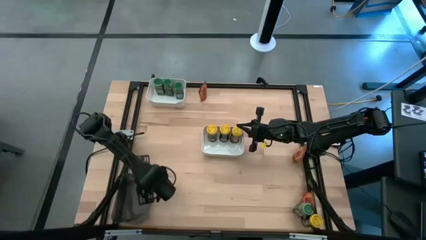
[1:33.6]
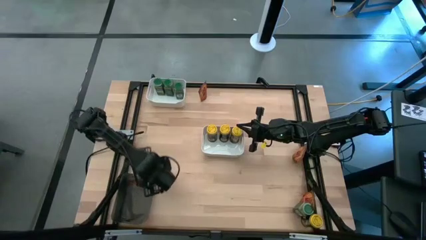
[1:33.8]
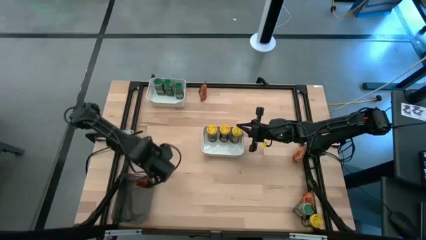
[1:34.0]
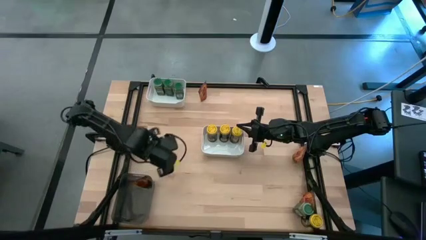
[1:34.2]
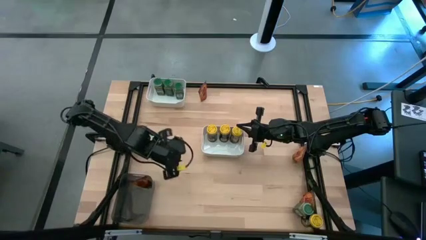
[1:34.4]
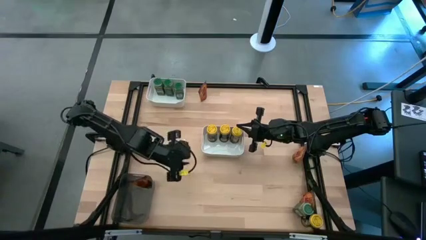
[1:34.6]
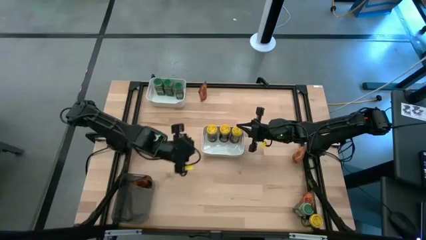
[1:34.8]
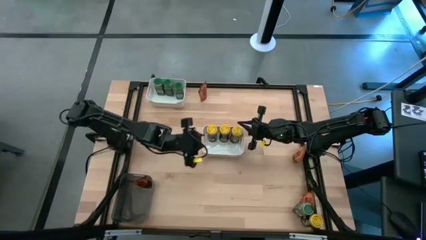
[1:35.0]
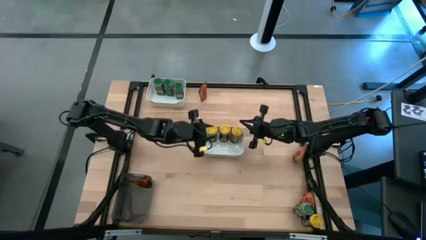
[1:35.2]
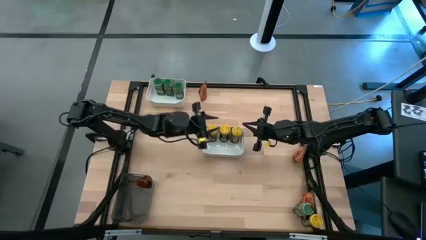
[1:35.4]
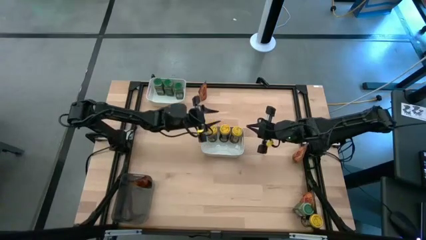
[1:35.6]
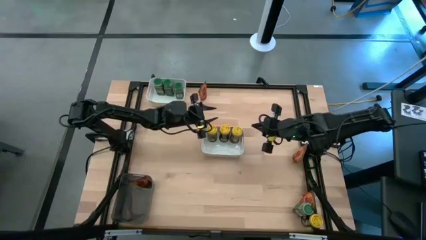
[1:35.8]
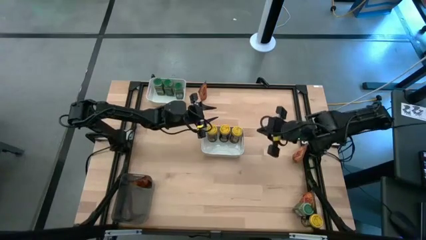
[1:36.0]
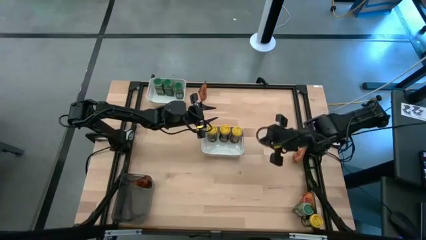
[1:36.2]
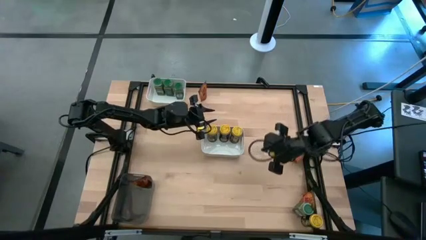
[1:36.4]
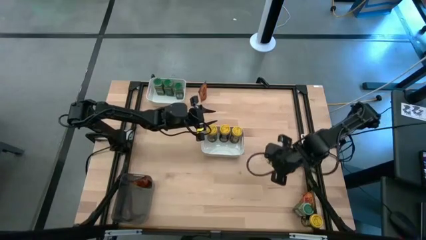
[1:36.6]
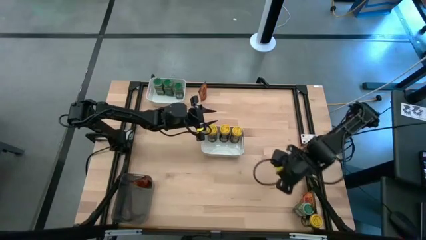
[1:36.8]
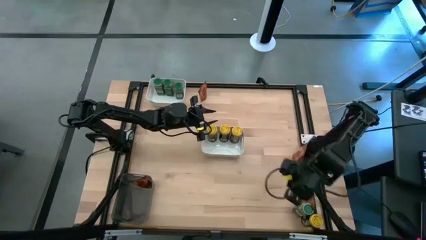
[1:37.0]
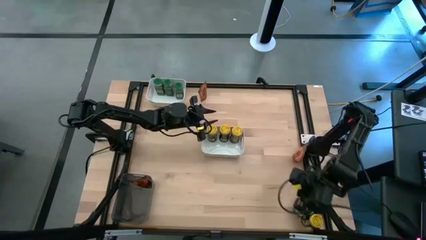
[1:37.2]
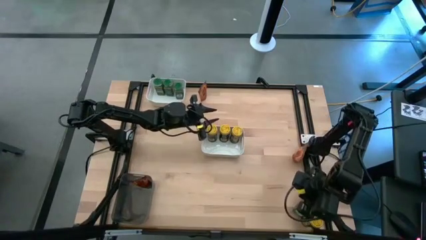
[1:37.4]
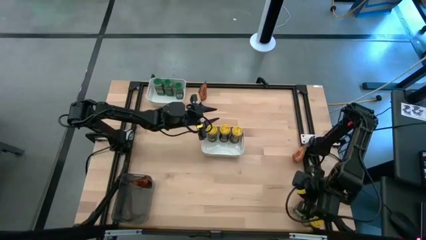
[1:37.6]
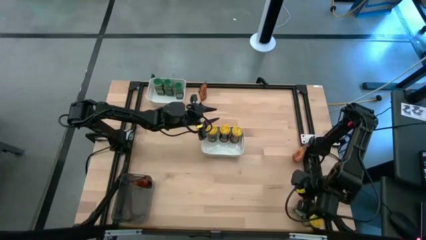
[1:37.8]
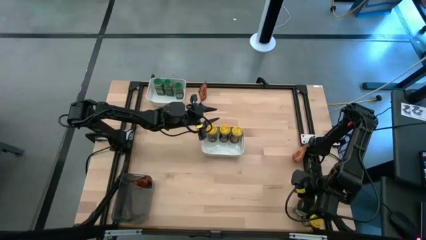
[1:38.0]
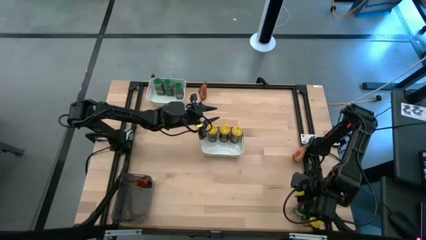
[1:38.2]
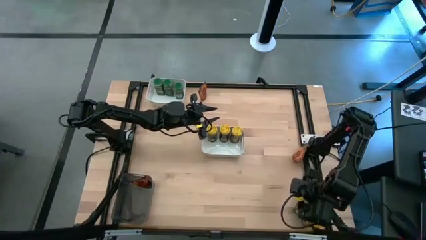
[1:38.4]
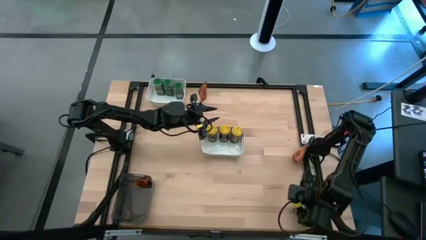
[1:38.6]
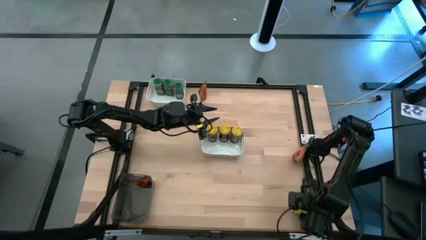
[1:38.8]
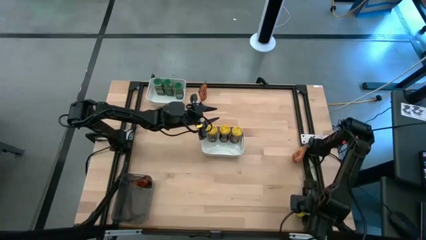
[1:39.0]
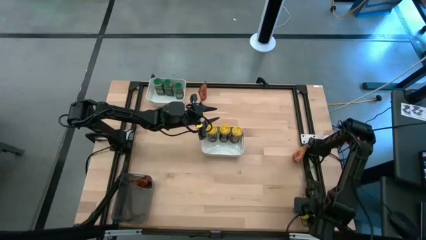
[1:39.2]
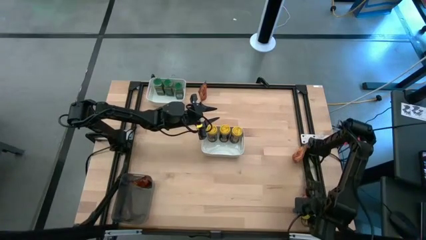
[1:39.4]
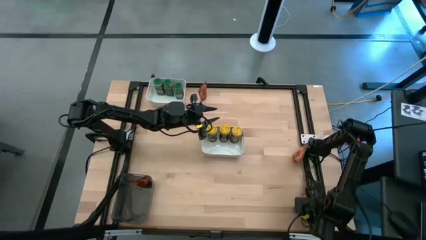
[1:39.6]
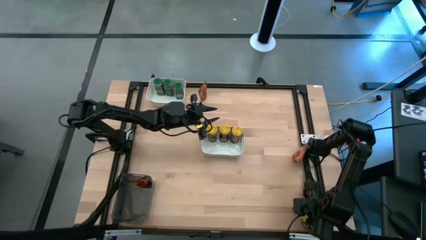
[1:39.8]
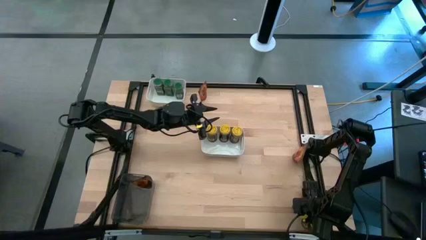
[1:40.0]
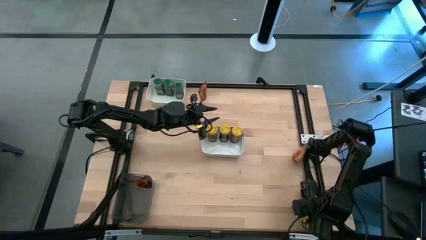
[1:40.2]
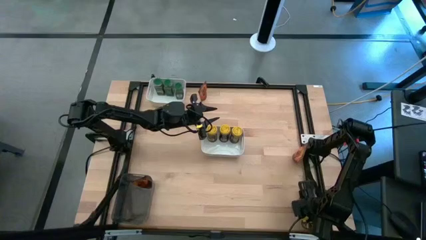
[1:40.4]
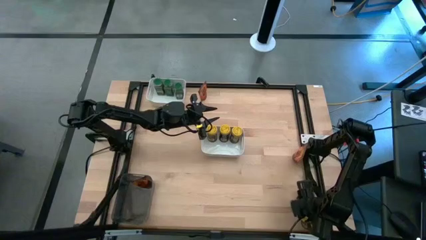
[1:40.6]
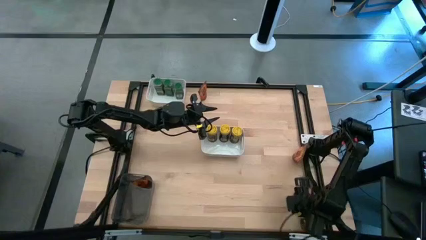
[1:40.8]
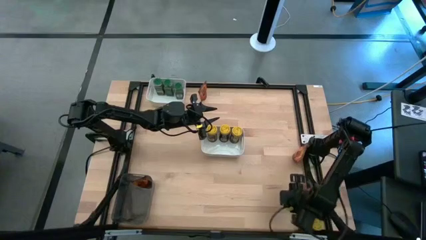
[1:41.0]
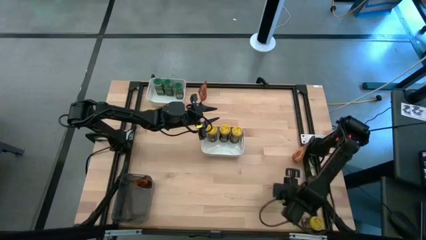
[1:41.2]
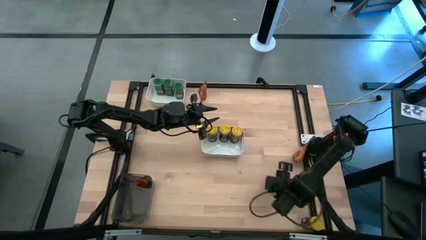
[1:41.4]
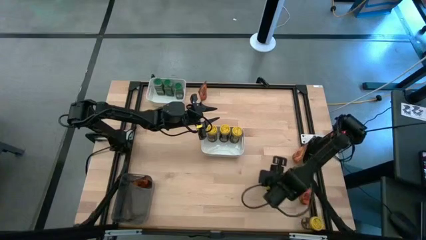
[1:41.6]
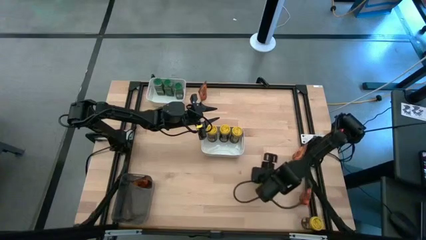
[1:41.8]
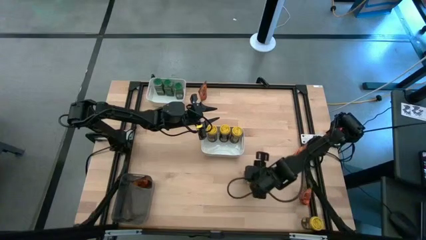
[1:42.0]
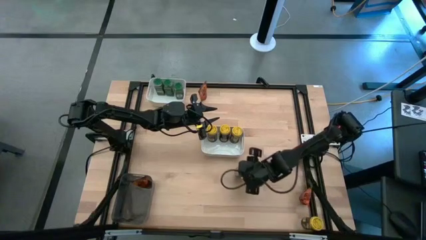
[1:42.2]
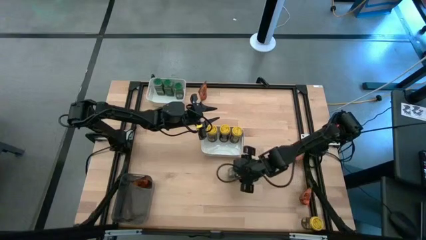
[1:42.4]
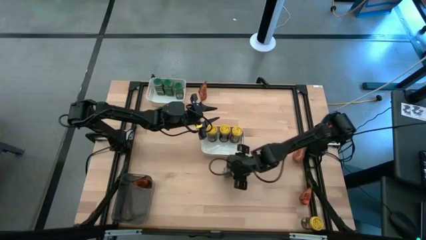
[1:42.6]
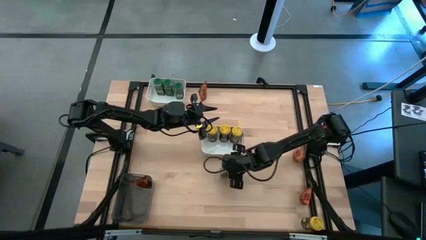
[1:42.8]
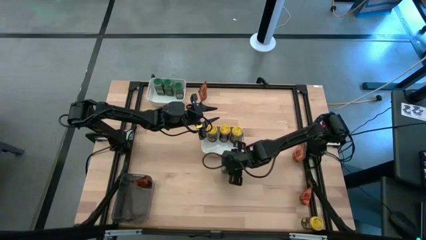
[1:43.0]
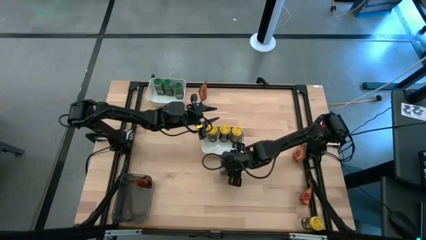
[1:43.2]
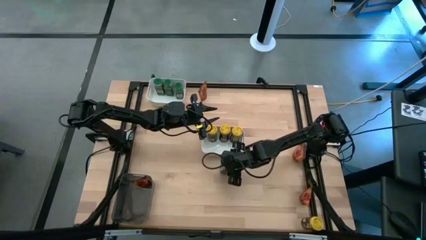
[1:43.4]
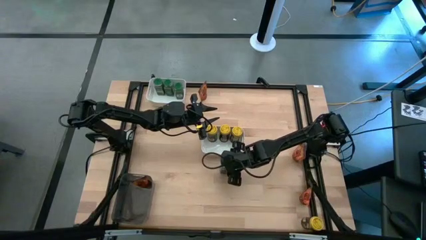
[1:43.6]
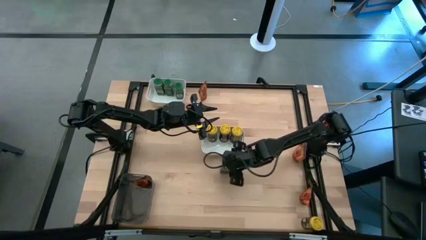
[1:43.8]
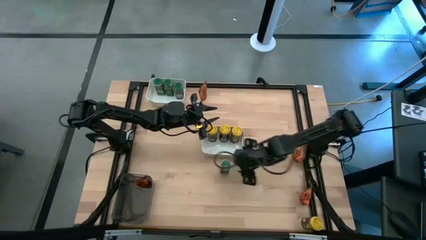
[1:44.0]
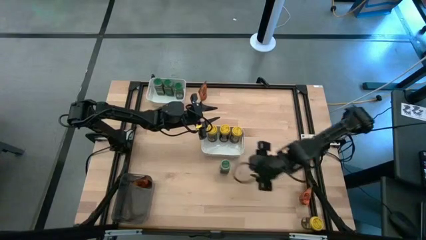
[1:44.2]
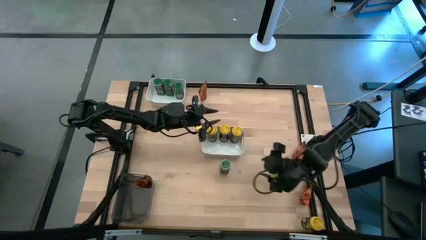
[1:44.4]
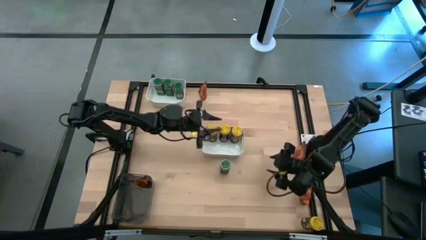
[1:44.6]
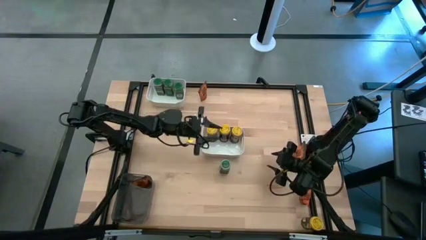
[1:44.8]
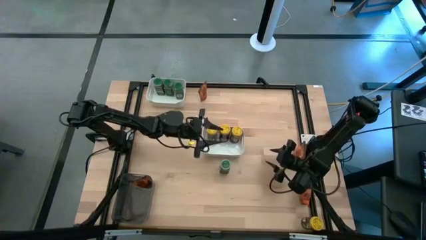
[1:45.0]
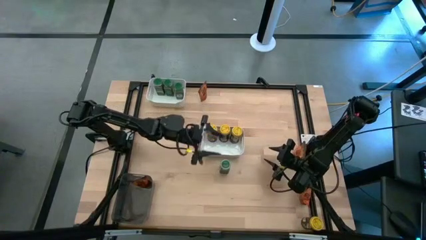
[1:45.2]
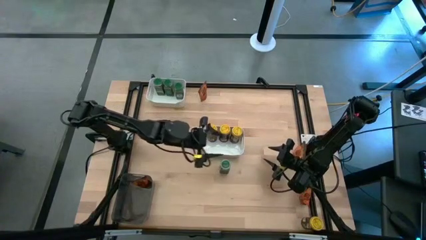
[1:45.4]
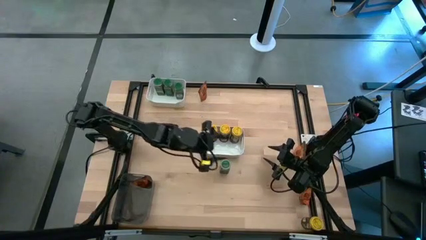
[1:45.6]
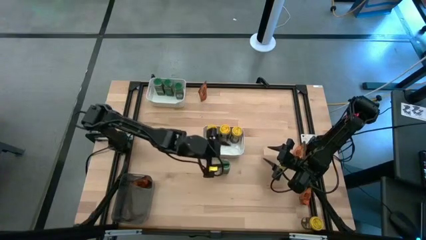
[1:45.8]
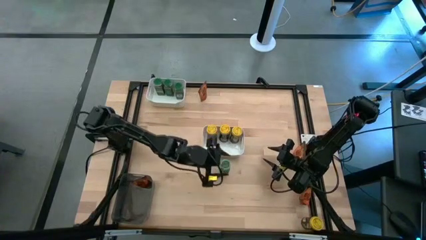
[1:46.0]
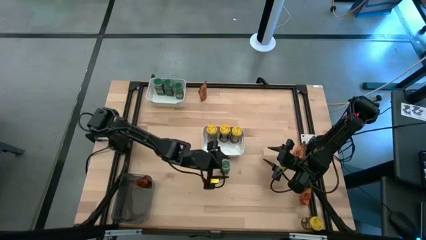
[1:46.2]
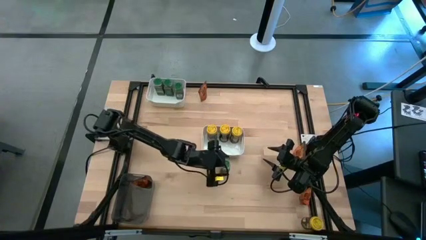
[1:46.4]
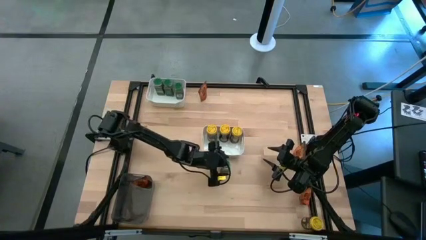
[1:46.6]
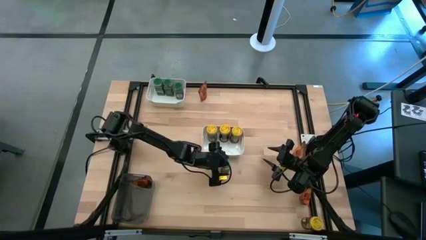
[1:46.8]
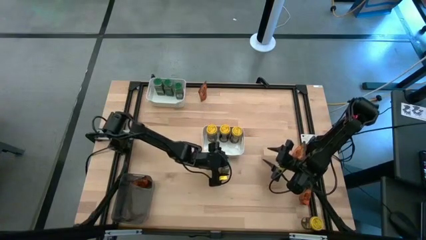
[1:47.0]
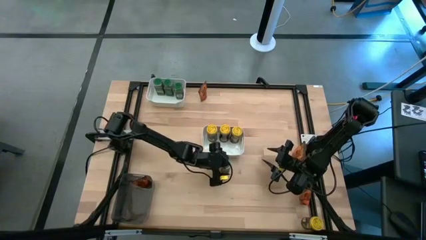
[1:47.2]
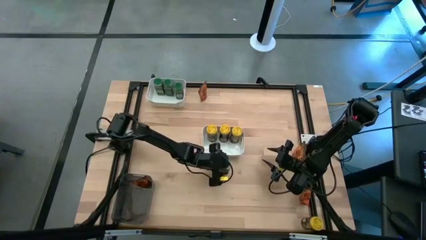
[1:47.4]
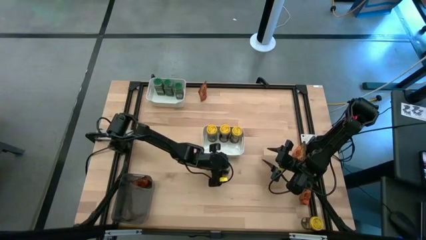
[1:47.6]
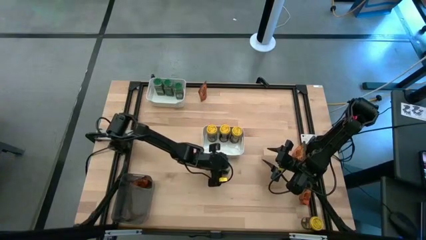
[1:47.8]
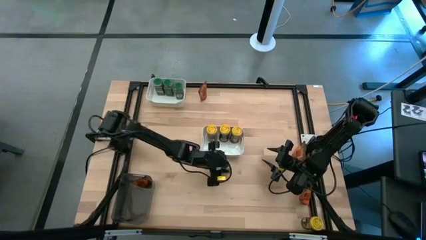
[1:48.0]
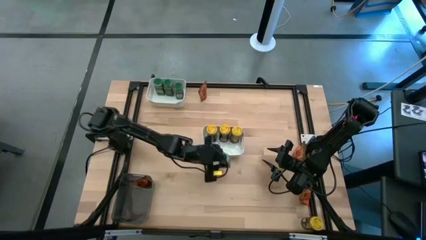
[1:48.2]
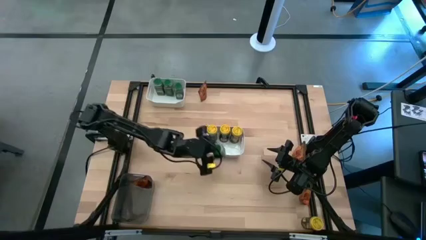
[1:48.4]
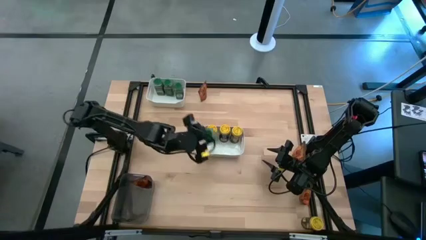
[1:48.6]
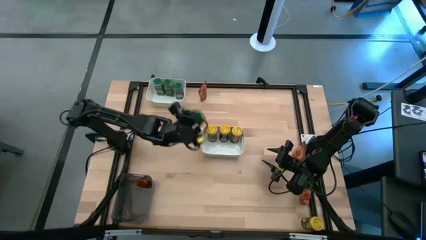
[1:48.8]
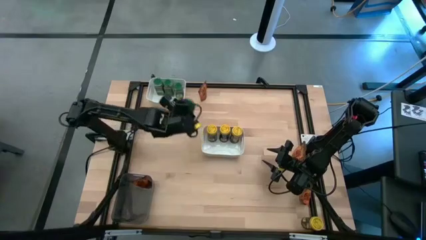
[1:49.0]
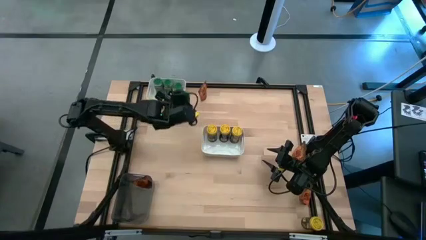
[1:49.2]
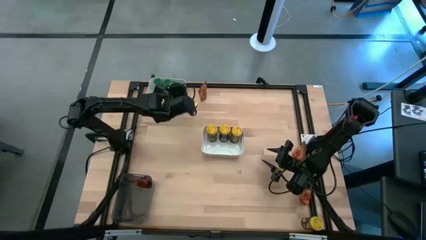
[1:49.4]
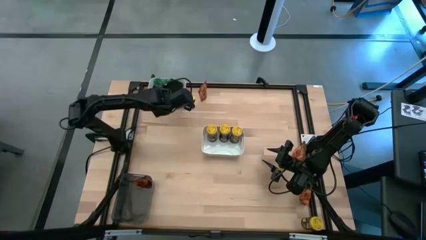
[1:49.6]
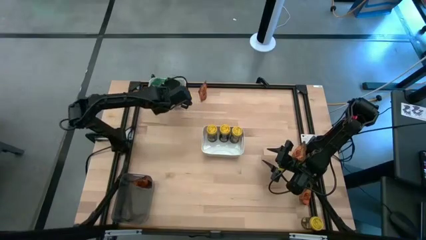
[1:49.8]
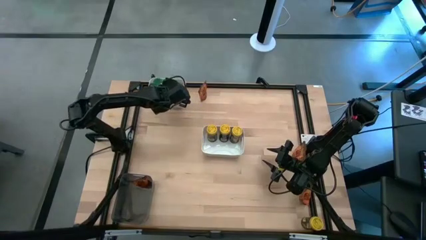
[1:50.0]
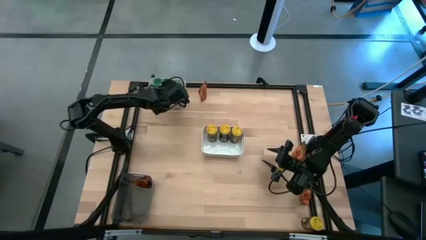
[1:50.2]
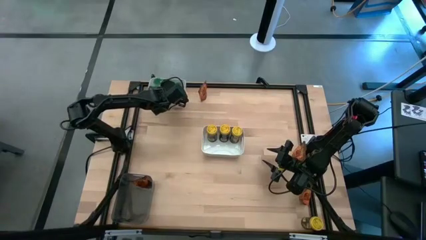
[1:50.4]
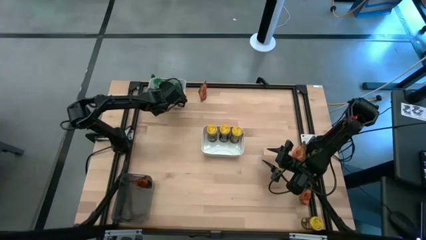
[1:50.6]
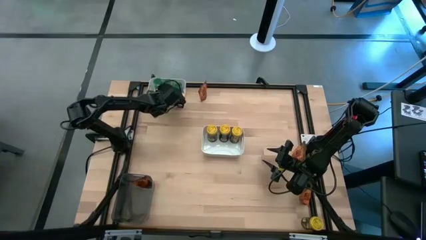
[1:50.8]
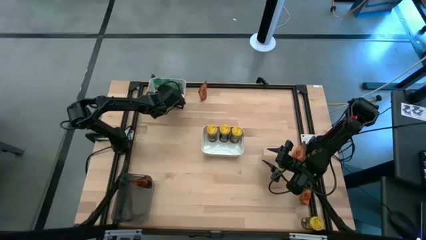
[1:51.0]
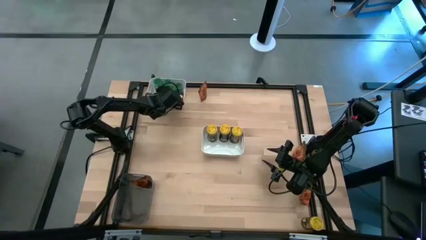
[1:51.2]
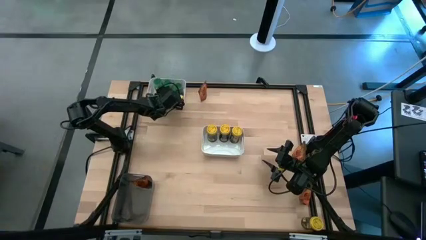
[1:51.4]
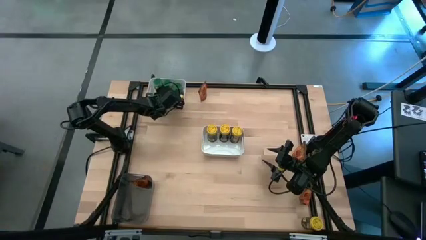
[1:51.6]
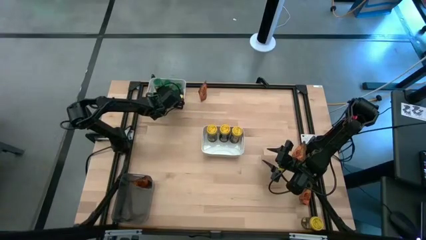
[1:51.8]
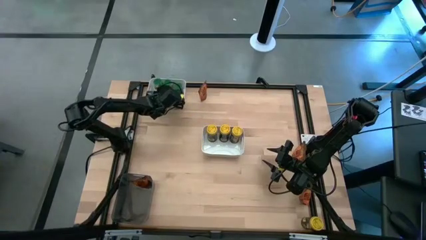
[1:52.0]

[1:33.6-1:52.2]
Task: Sort spices by type
Put the green seasoning bottle into the top white bin
